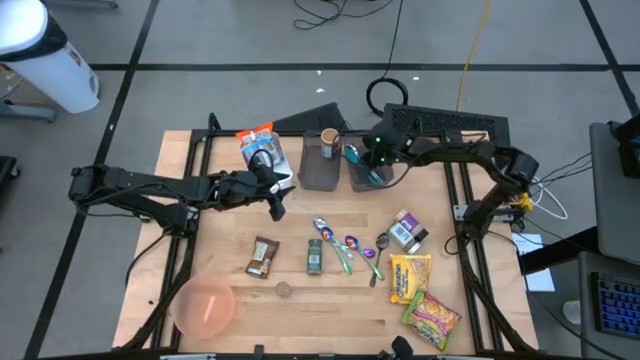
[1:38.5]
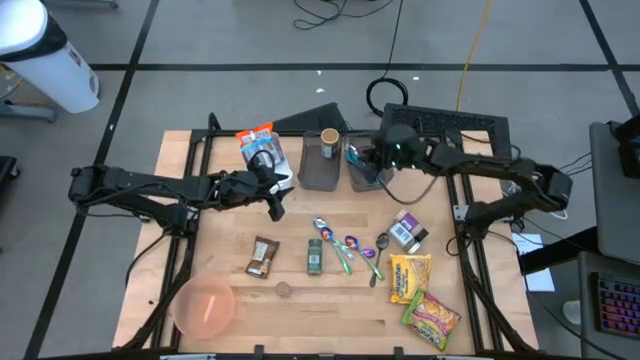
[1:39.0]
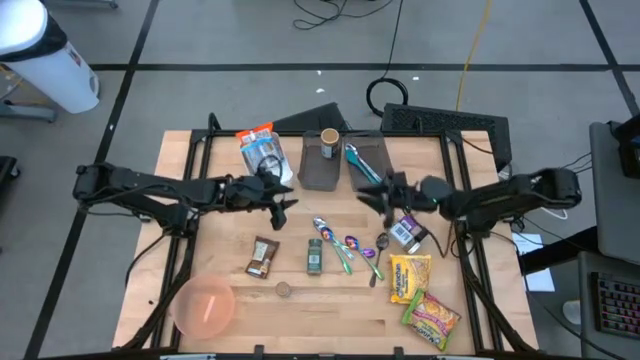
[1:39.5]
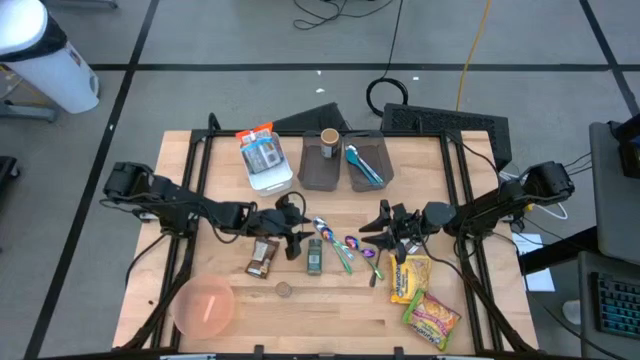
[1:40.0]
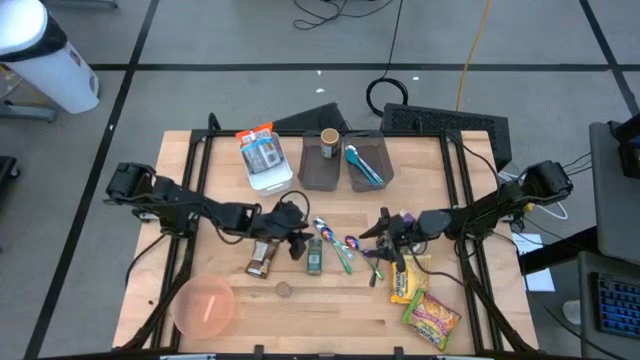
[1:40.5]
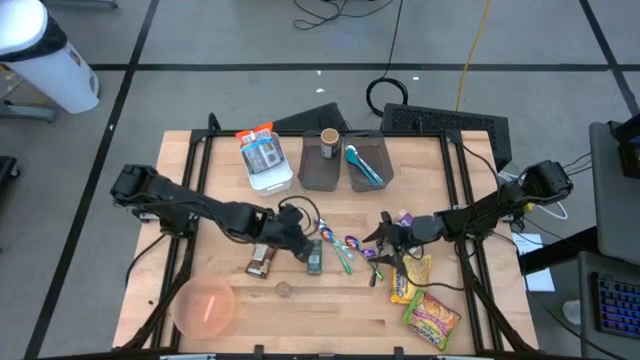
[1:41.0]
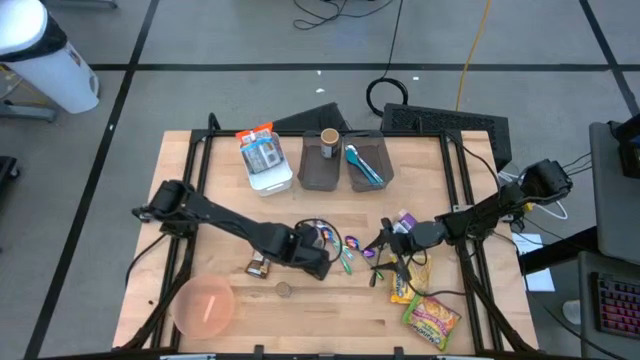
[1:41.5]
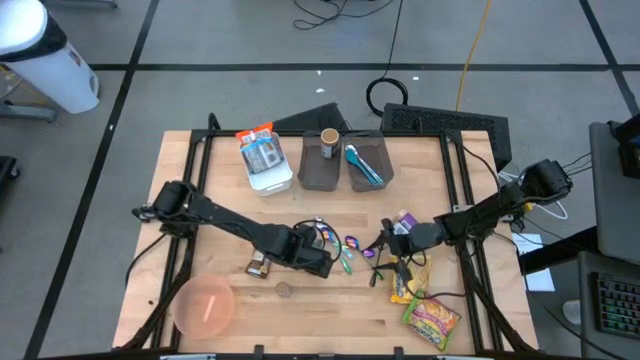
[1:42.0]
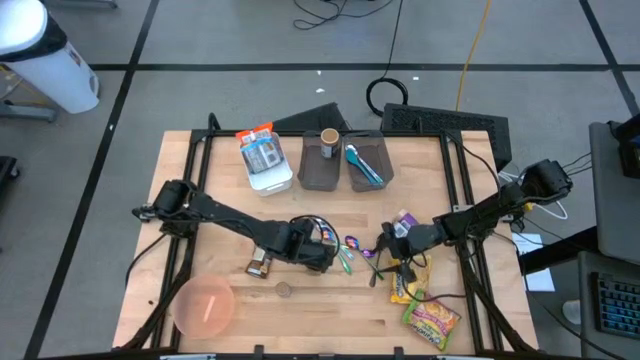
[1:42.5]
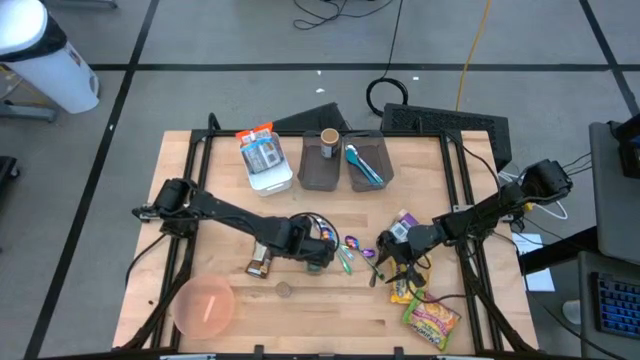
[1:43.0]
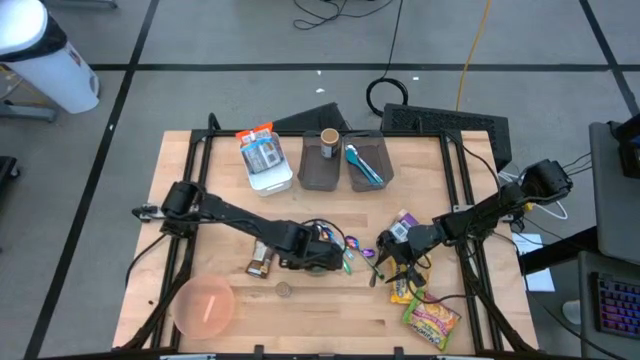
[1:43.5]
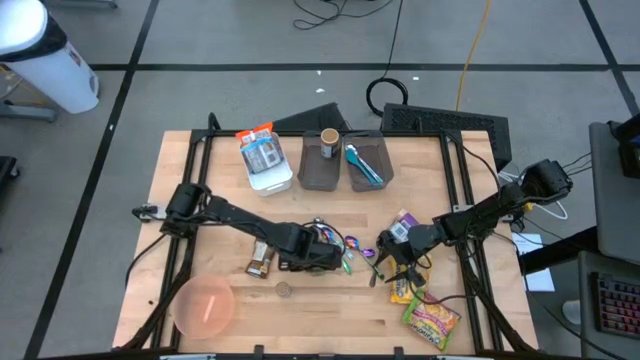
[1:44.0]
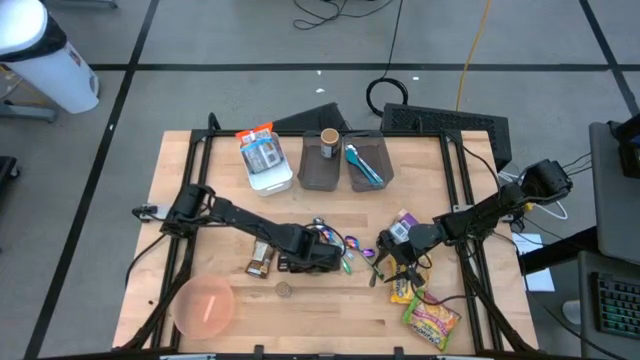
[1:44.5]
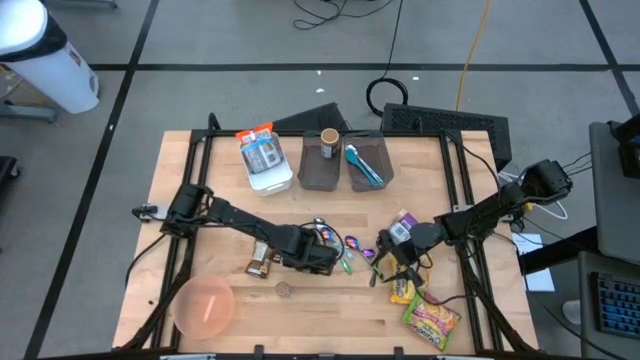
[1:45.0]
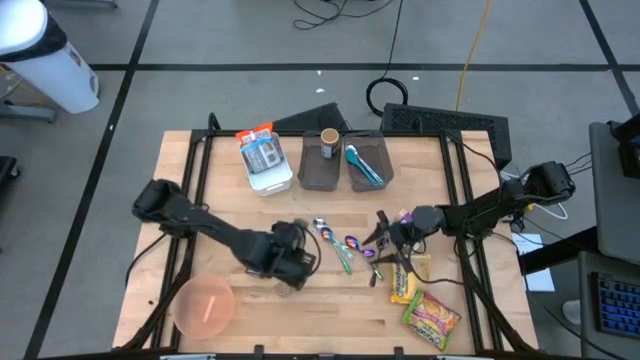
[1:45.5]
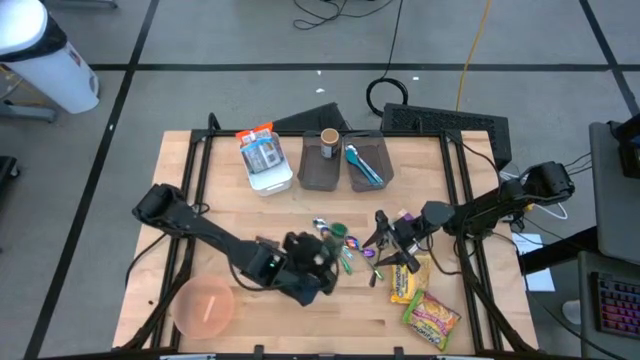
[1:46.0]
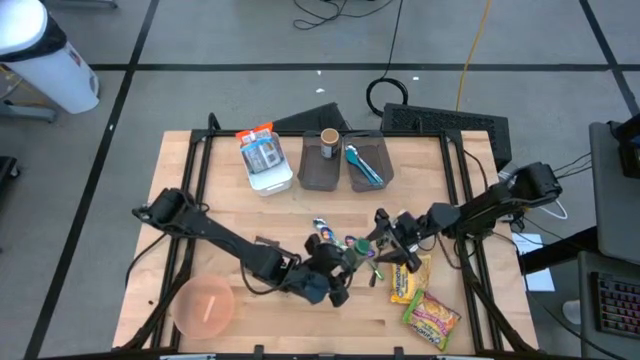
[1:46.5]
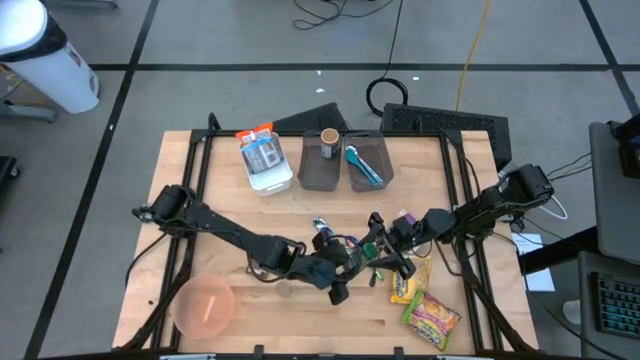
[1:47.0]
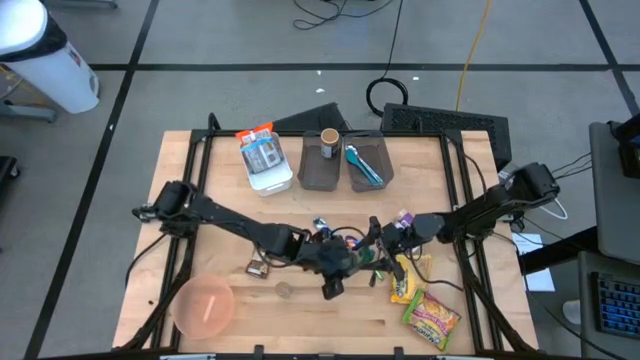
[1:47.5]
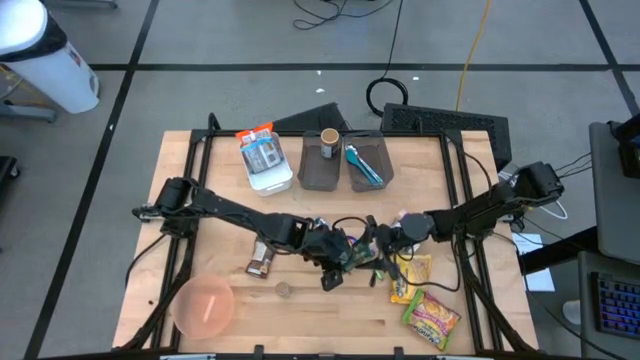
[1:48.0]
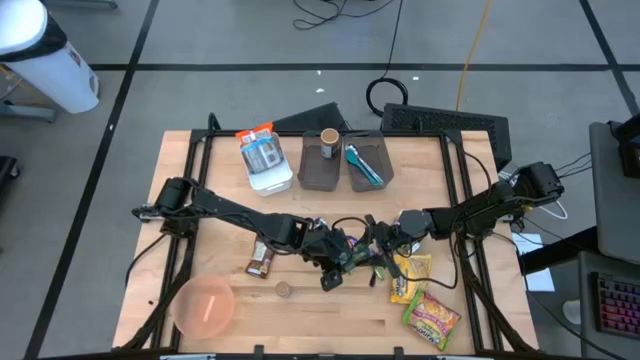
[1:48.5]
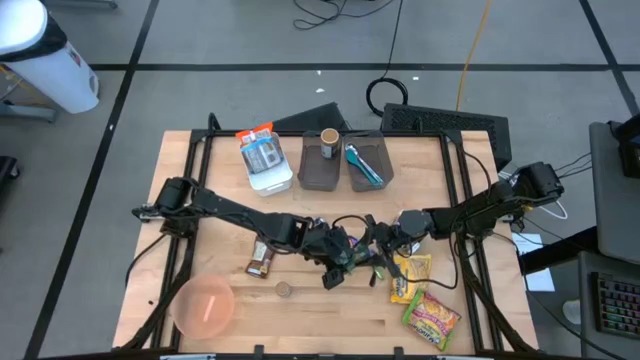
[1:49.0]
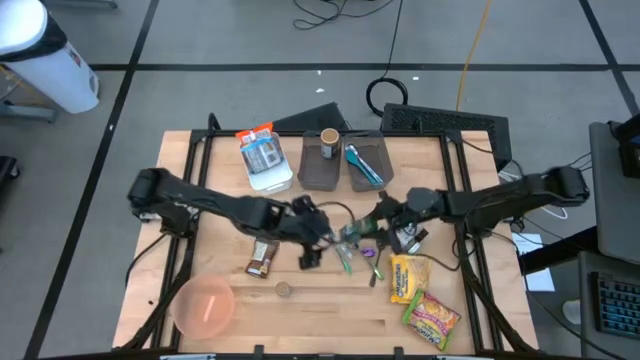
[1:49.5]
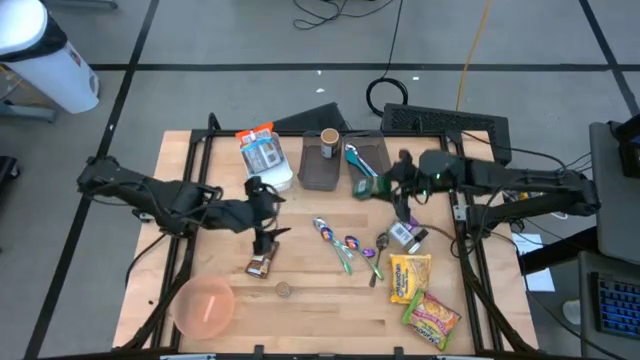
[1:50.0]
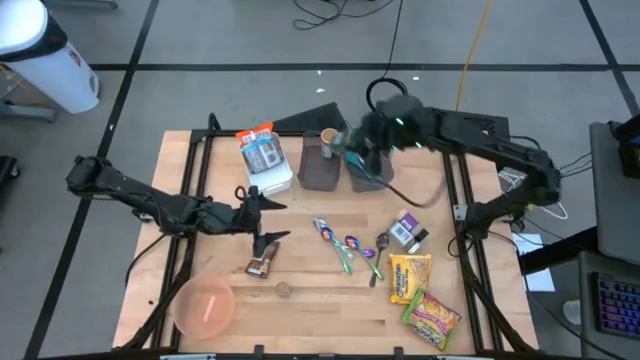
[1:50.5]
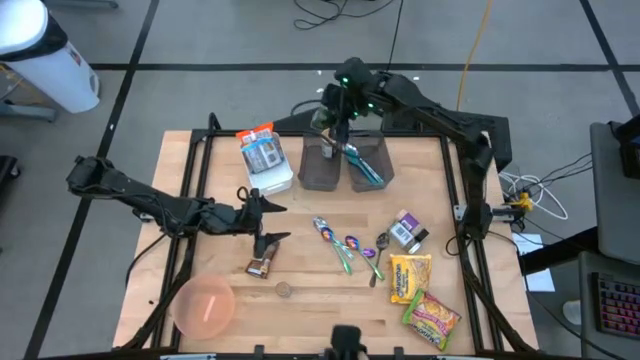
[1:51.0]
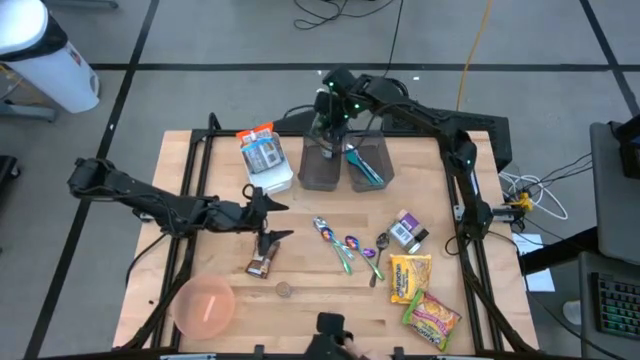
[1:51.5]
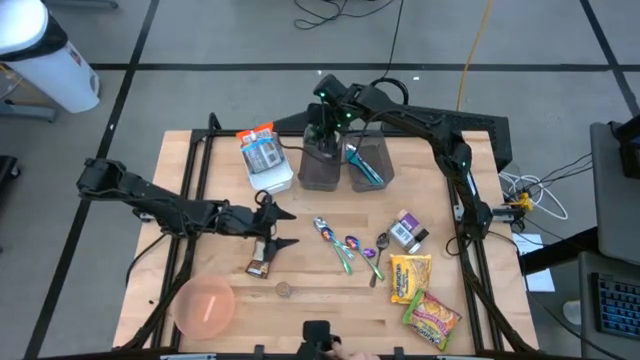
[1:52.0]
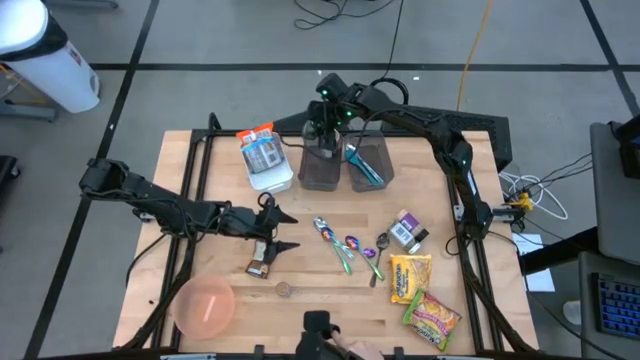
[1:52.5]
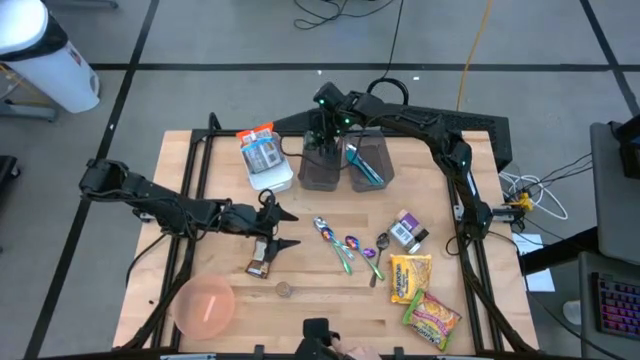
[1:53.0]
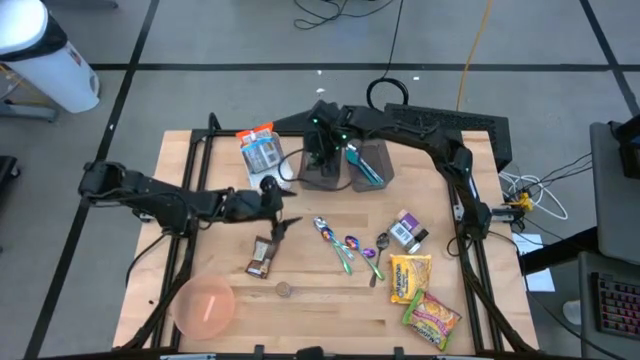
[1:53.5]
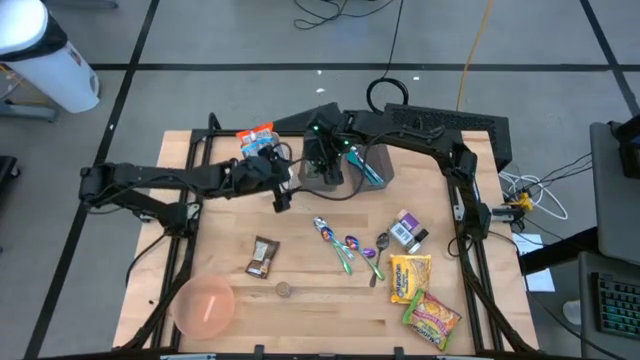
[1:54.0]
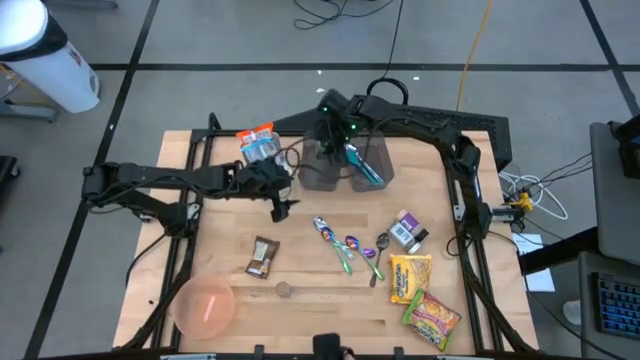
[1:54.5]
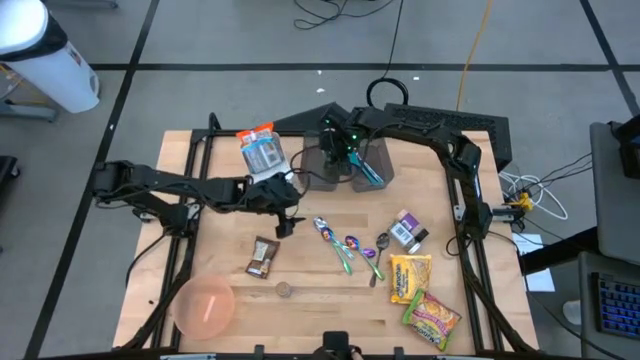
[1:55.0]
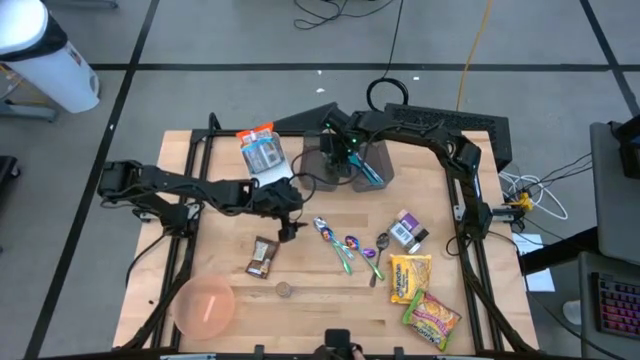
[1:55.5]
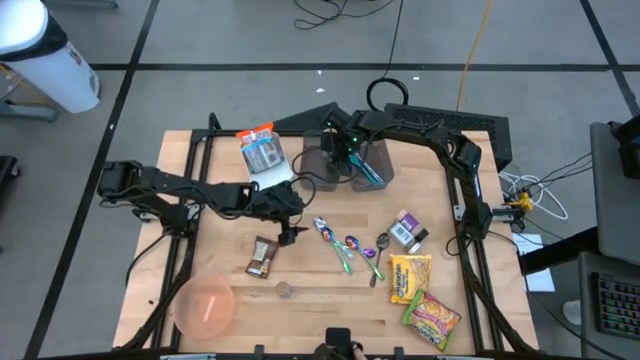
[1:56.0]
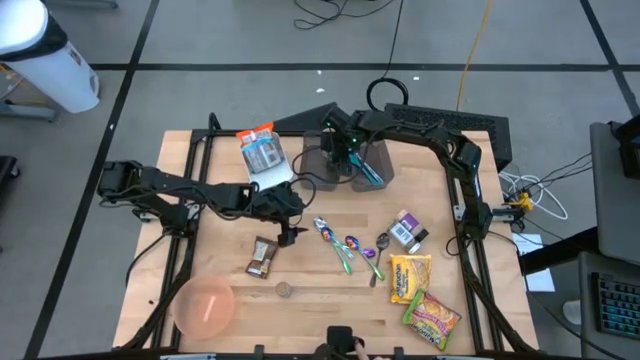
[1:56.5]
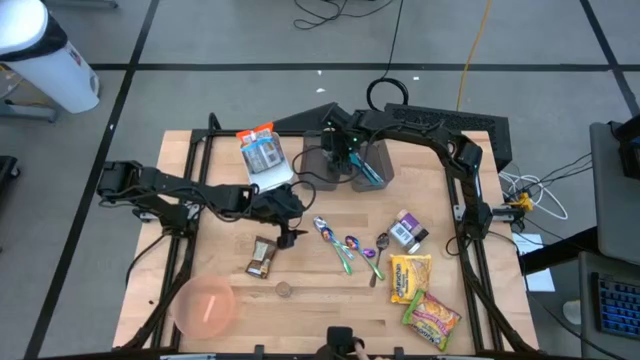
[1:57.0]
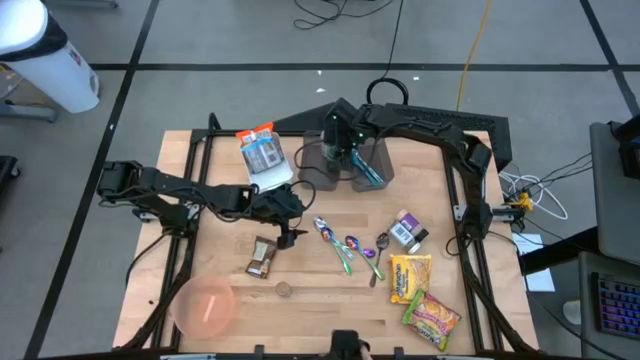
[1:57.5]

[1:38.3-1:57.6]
Task: Pick & Place Food Item
Put the green seasoning bottle into the left black bin

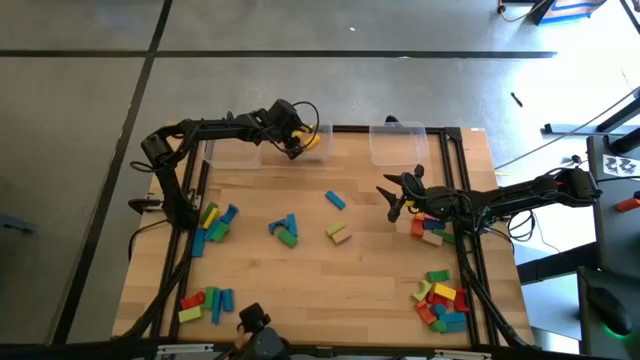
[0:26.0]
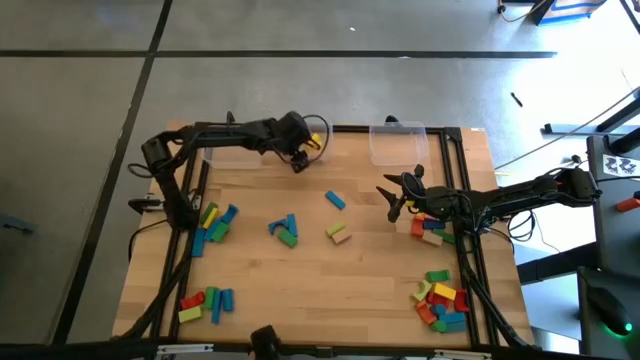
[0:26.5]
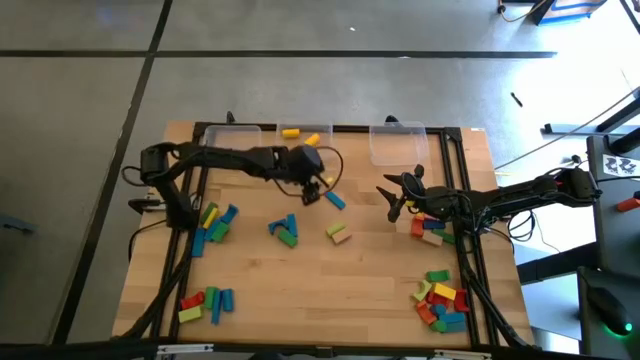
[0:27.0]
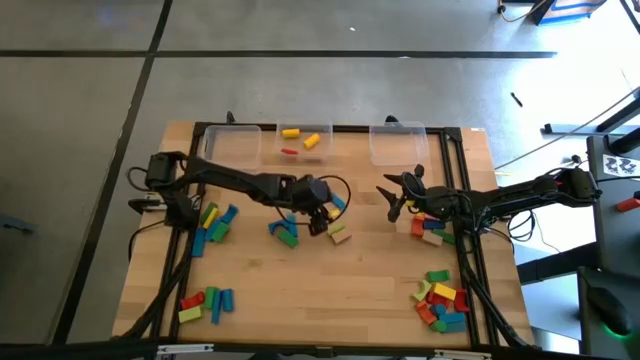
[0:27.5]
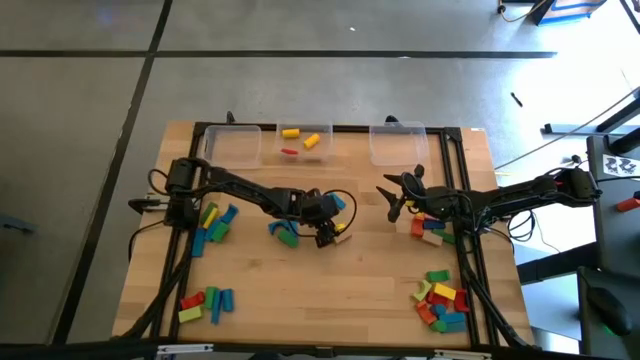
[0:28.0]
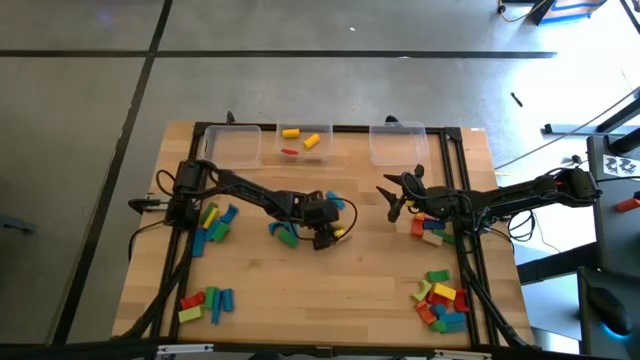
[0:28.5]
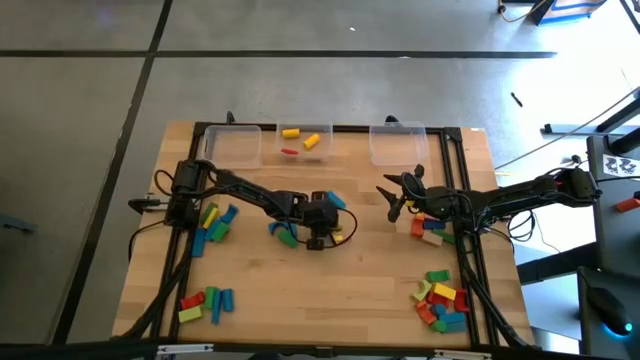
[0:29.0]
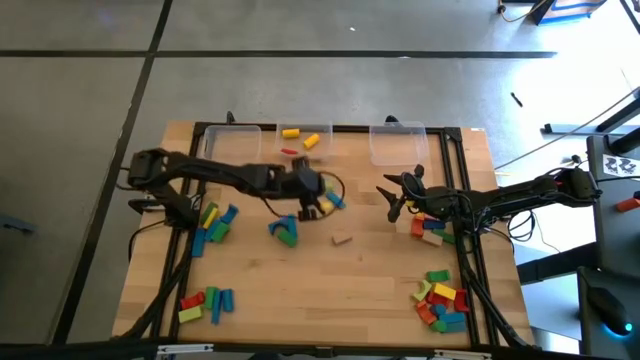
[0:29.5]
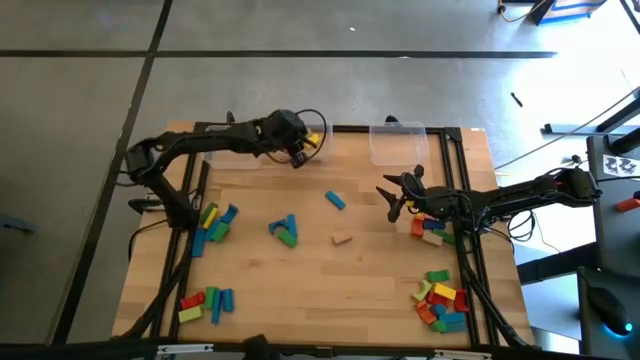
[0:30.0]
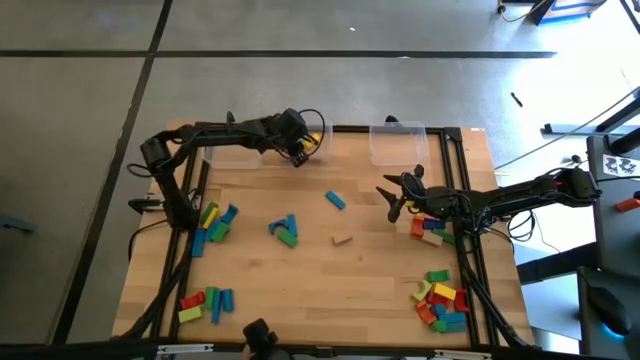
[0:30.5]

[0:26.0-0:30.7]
Task: Sort blocks by size
Put the light green cylindrical block into the middle transparent bin
